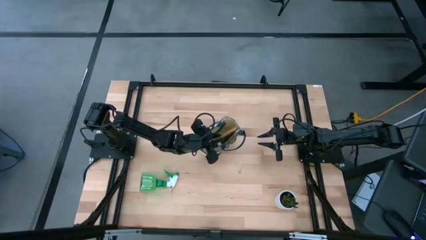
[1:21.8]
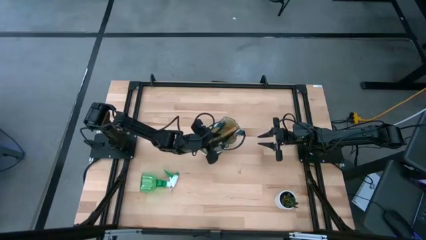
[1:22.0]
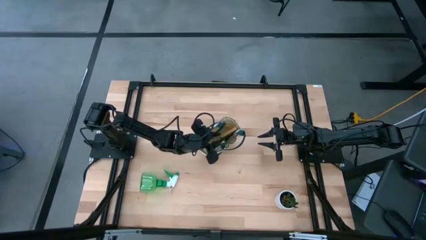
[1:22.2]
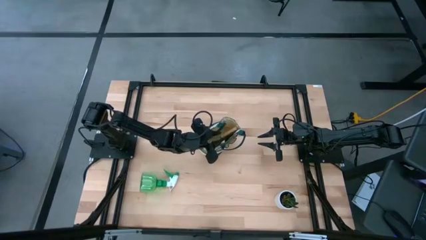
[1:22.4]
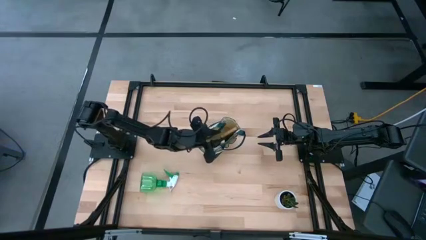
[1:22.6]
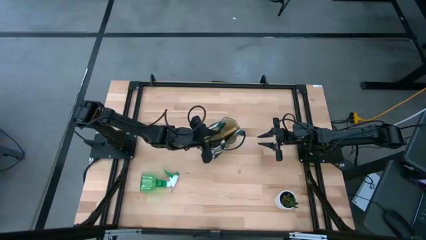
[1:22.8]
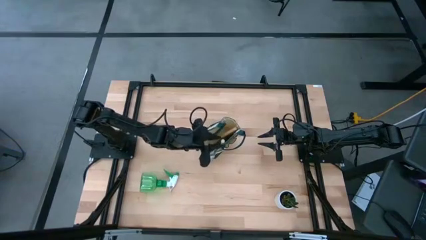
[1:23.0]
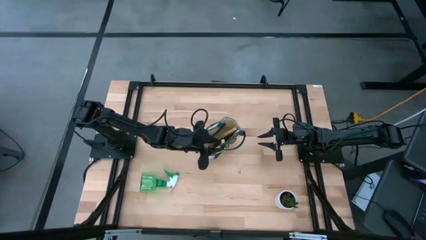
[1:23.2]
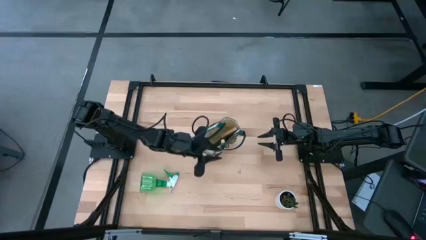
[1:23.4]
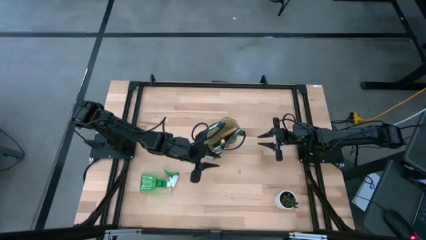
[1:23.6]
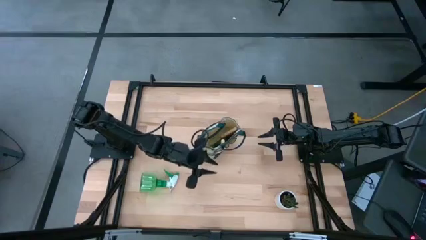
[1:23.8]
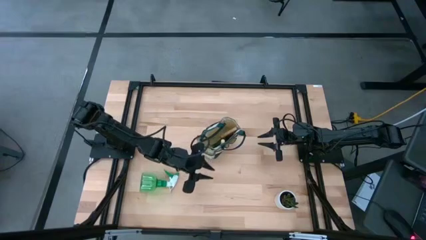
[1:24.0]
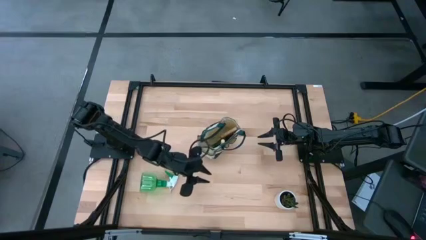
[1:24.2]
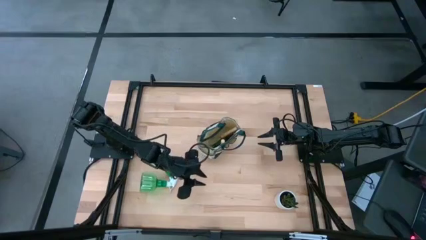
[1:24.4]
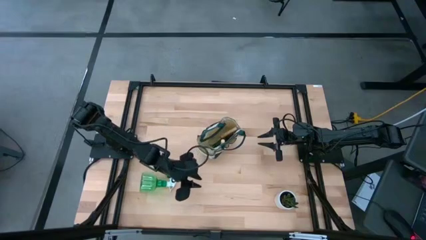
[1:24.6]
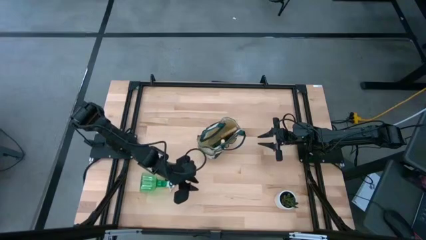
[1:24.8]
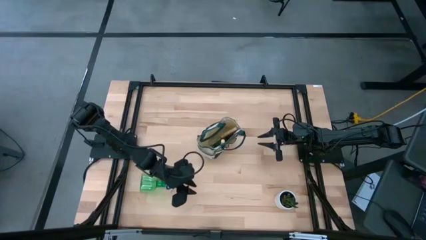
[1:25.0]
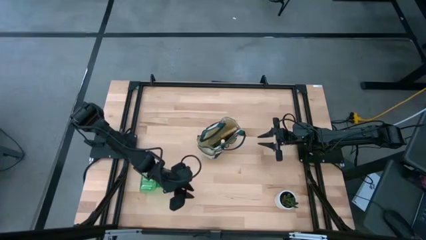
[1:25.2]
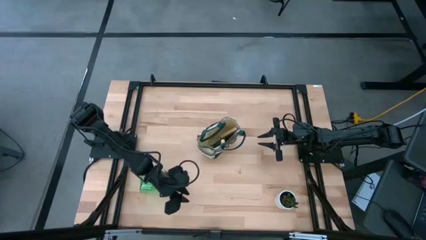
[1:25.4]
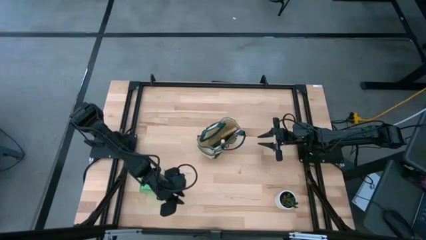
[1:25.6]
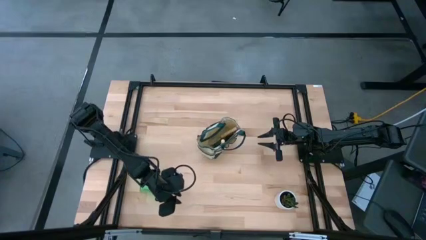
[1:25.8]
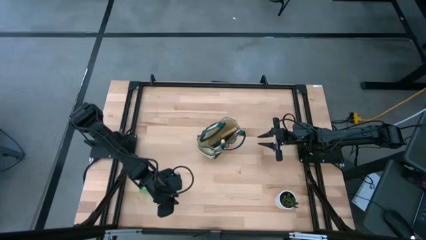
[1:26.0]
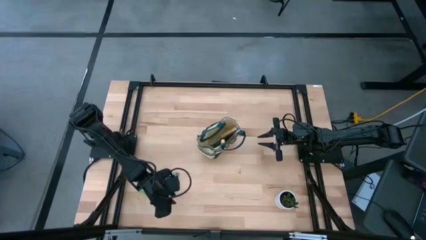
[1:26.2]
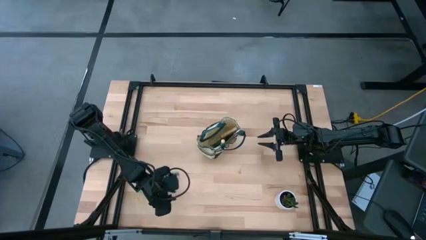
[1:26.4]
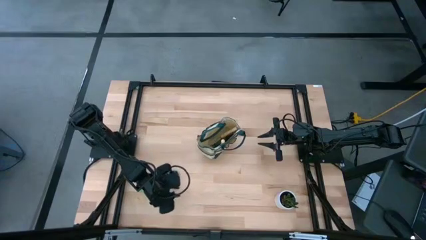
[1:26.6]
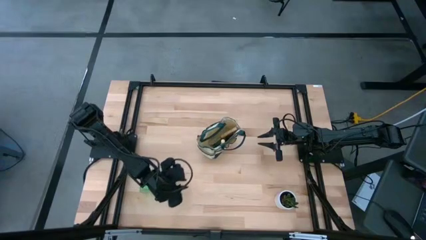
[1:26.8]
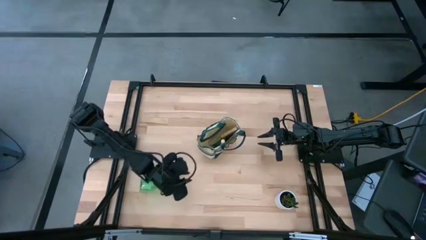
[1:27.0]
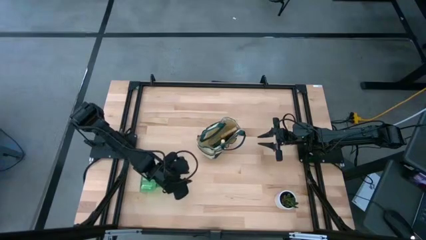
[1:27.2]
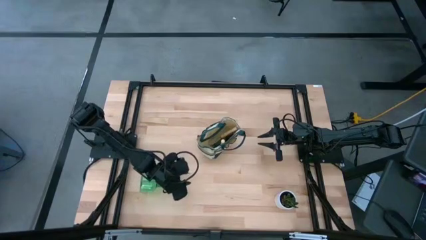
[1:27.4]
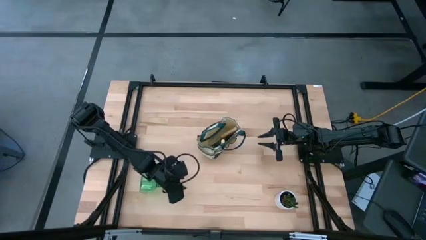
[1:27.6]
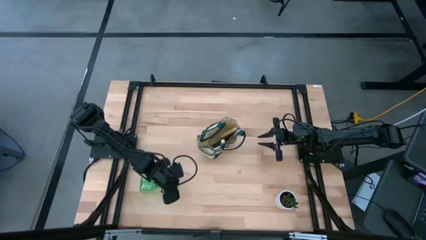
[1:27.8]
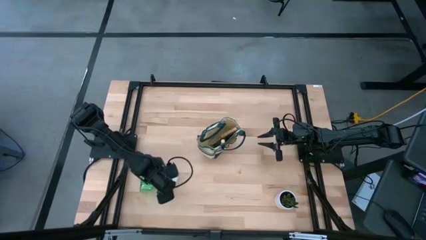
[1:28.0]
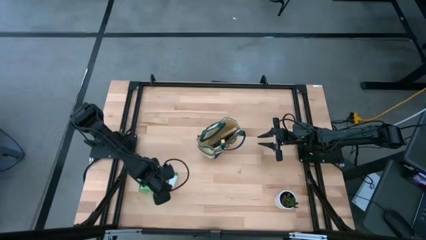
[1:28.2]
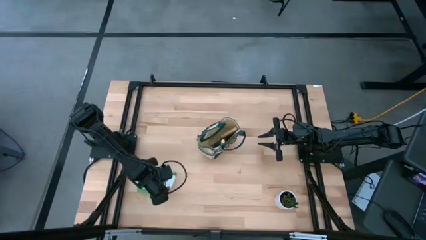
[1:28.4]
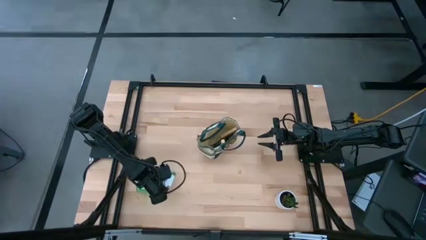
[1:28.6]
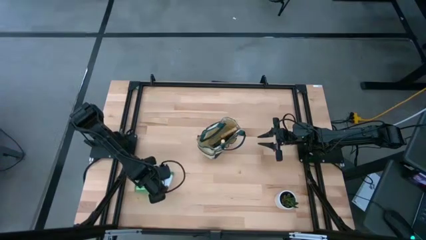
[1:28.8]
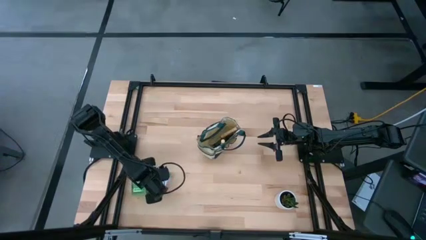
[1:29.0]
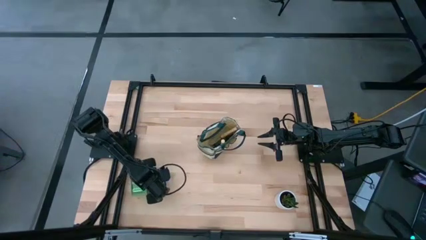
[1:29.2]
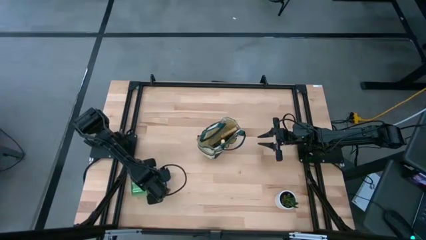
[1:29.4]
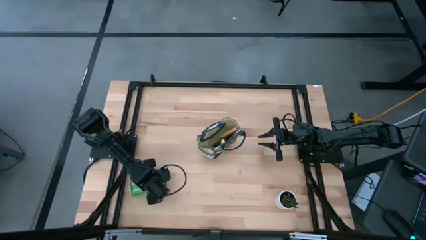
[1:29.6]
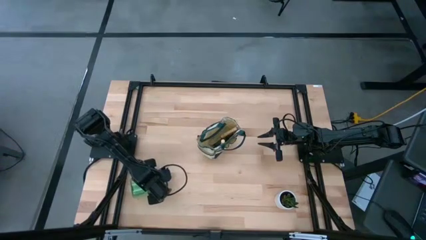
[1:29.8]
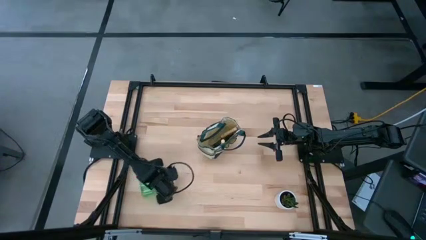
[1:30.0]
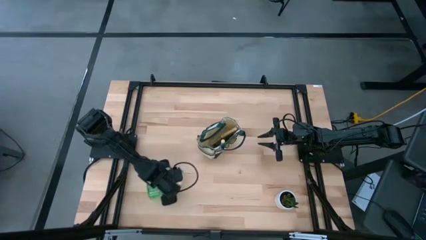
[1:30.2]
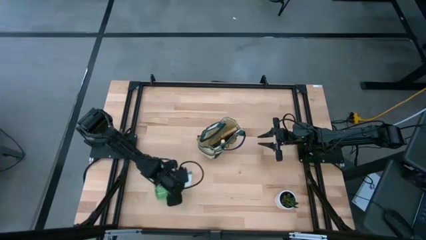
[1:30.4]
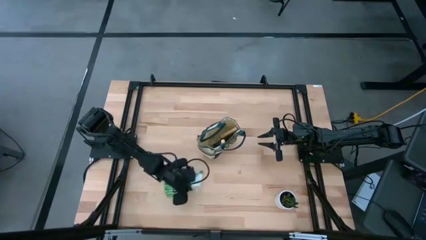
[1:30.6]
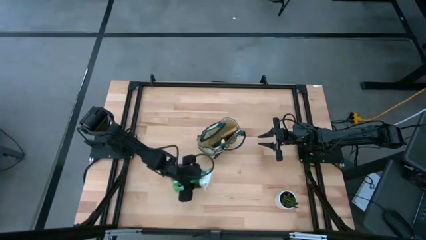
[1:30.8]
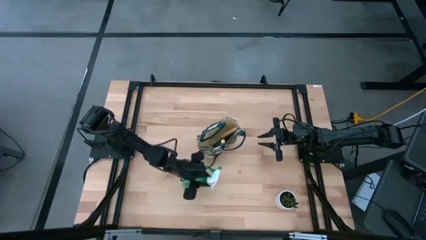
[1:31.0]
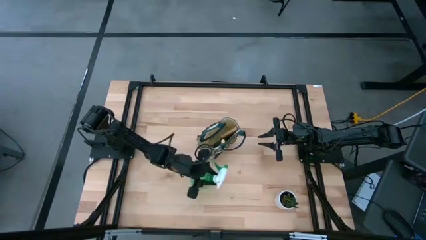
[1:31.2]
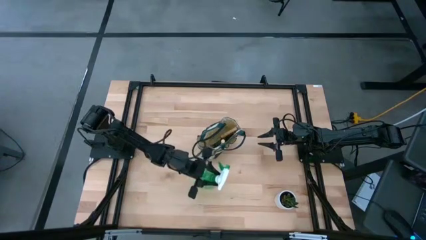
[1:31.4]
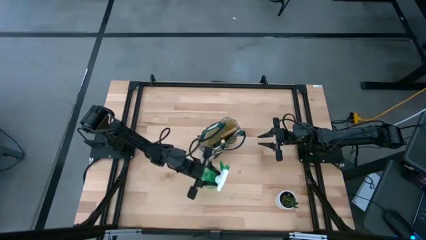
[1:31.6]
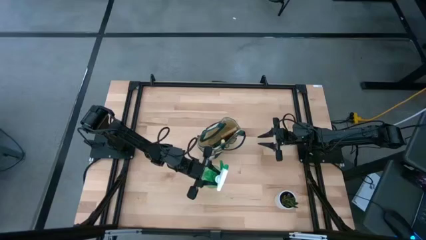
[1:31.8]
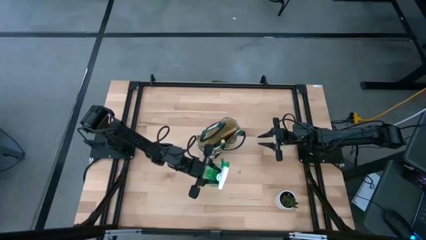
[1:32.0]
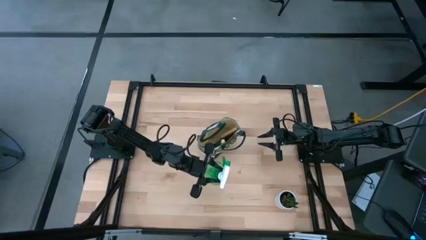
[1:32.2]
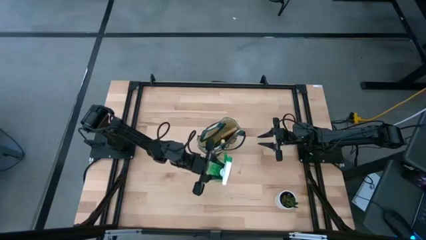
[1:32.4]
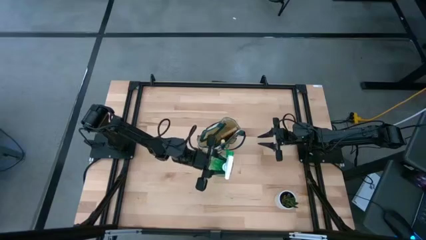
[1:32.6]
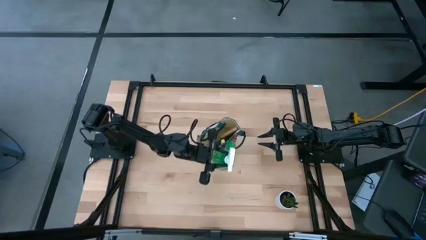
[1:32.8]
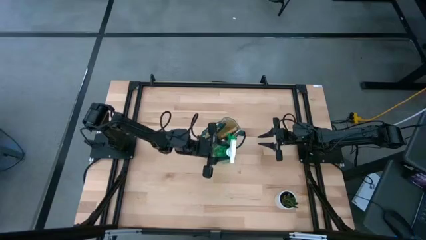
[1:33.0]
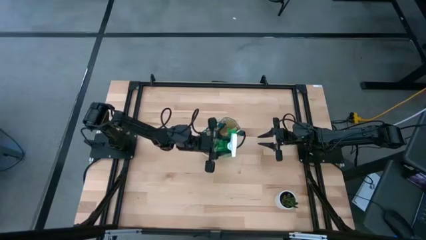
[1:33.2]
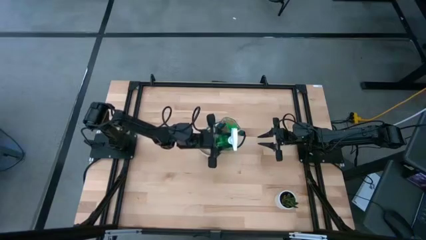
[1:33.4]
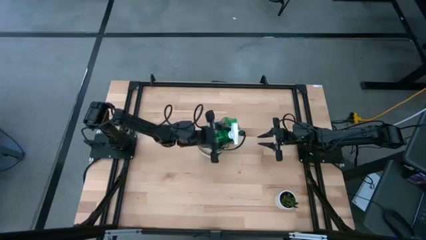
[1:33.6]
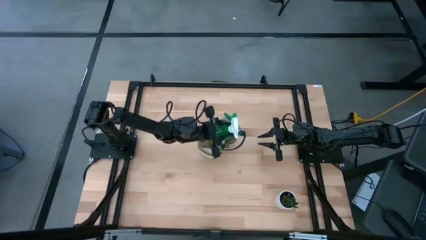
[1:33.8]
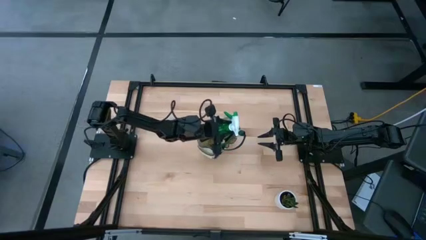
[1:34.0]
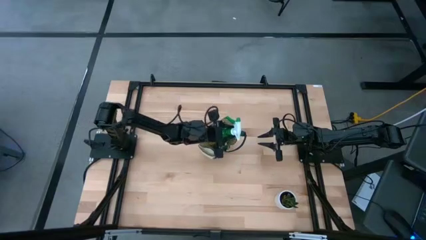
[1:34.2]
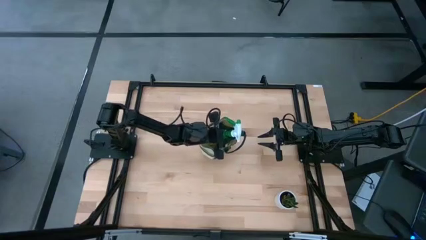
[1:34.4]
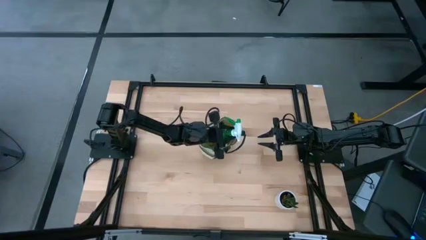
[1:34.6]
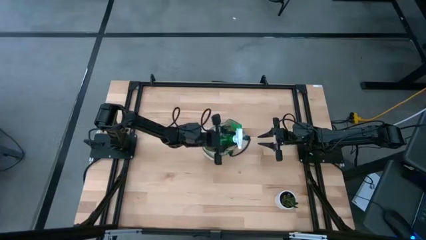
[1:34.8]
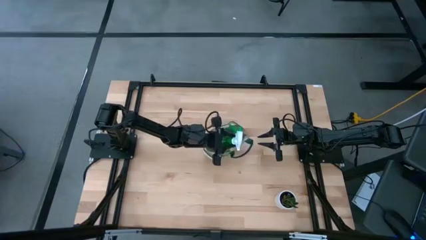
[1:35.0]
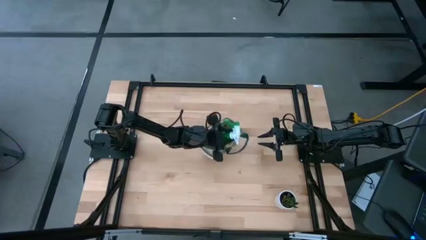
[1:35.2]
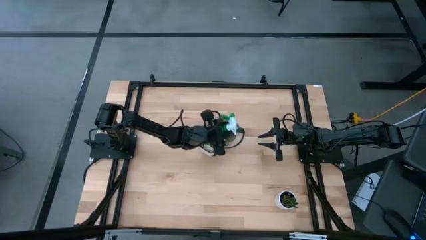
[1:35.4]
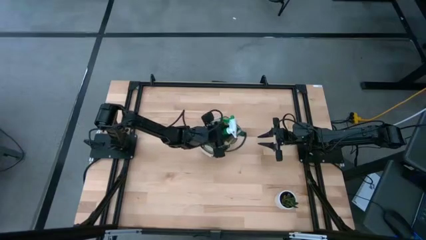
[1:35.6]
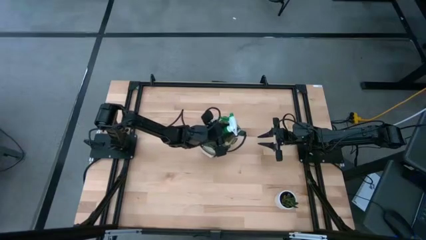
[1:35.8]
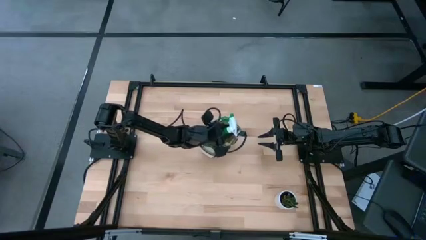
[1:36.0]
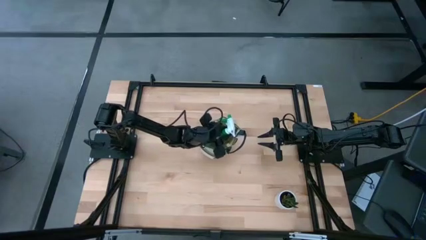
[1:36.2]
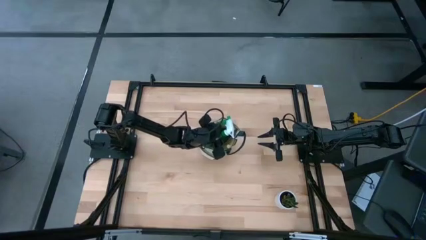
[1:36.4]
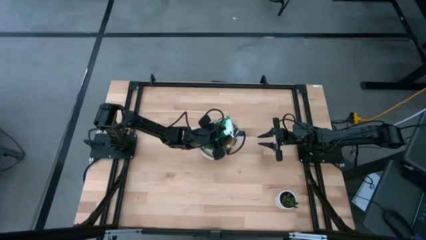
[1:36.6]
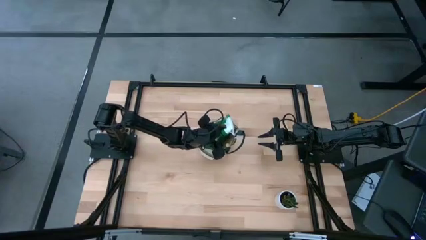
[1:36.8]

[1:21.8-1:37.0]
Task: Pick & Place Garden tools in Gardening bag
Put the spray bottle into the gardening bag

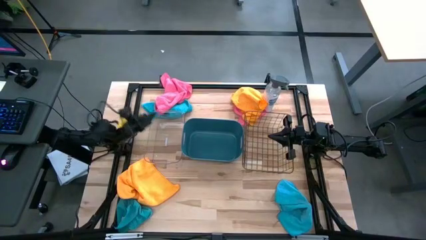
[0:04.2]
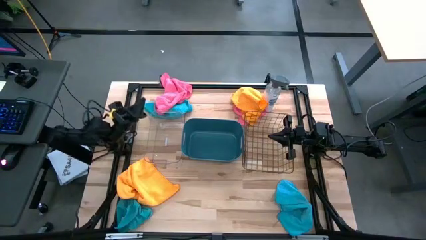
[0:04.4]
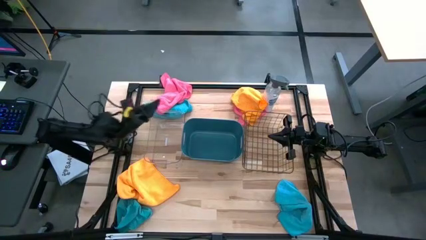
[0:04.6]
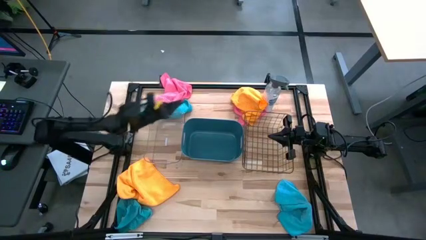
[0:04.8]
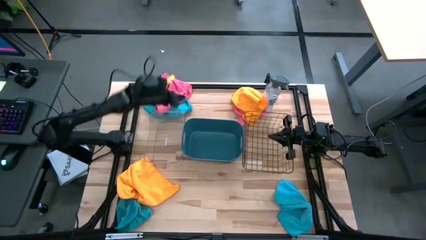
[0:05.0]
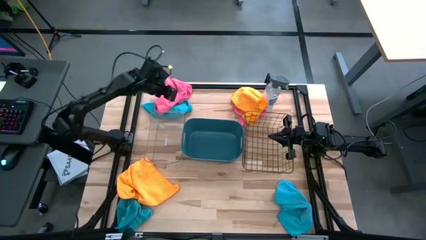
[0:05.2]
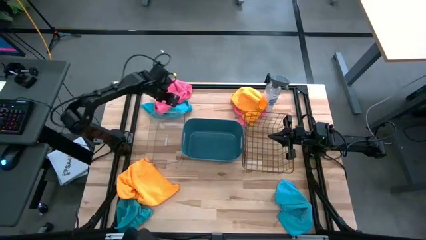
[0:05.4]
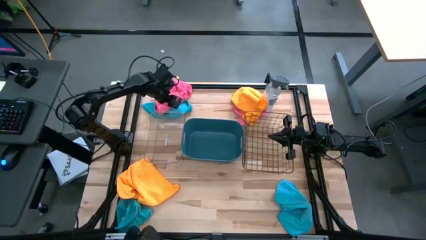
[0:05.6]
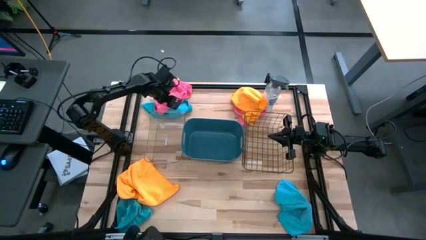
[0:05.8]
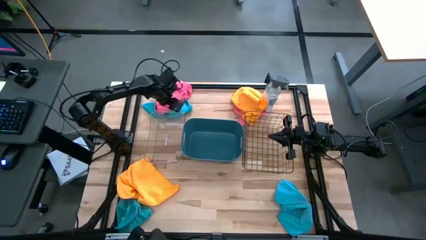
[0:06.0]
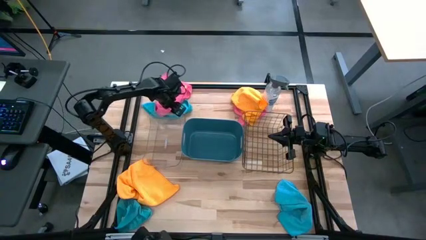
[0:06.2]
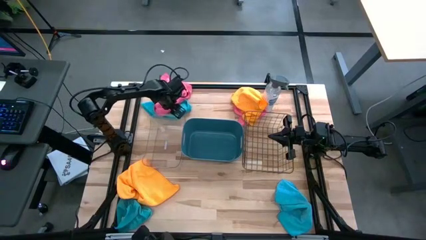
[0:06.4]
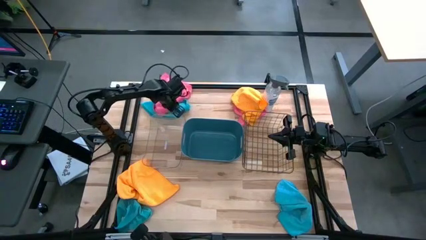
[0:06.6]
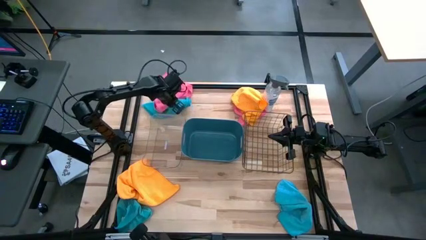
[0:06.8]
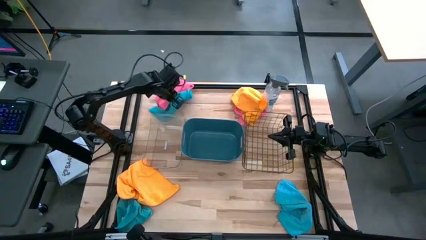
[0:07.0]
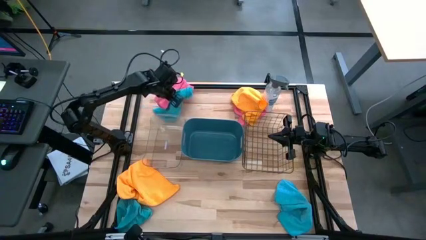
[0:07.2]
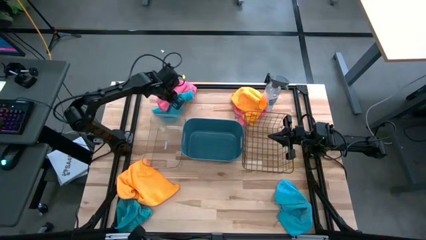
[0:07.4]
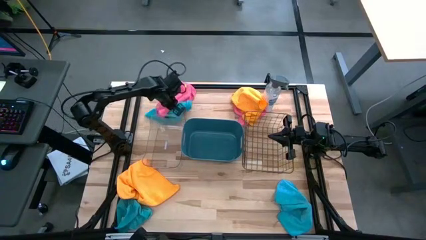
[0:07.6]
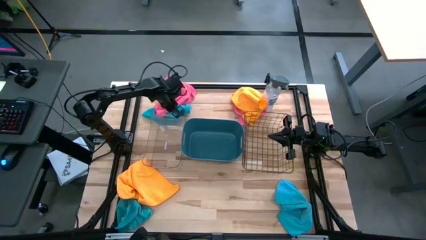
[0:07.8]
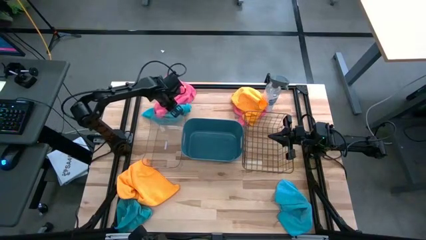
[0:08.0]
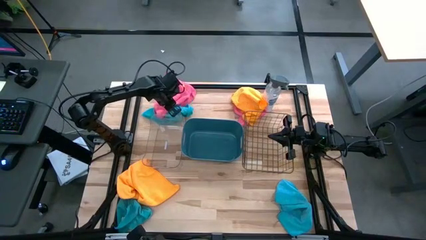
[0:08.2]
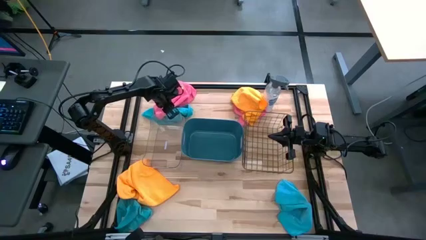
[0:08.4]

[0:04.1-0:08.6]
Task: Sort microfiber towel by color & place in baskets
Put the left pink microfiber cloth into the transparent bin
